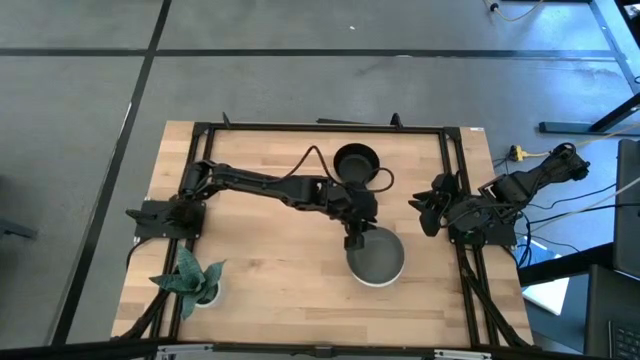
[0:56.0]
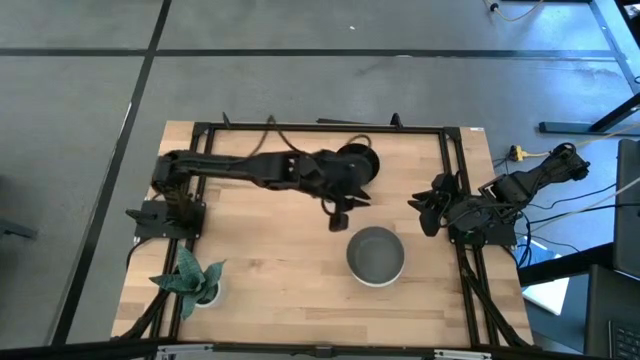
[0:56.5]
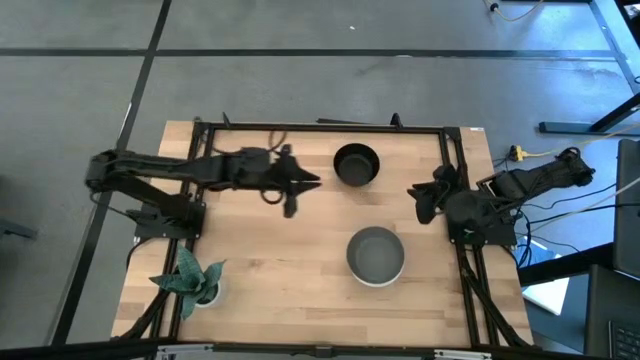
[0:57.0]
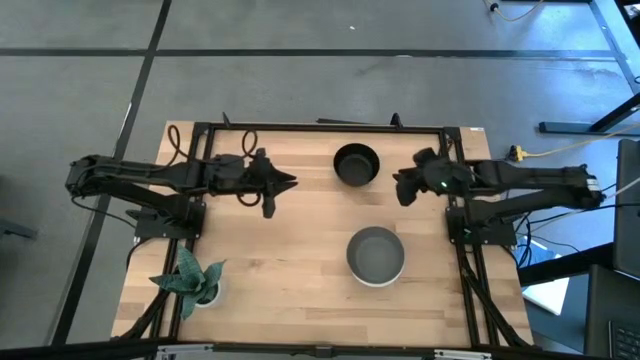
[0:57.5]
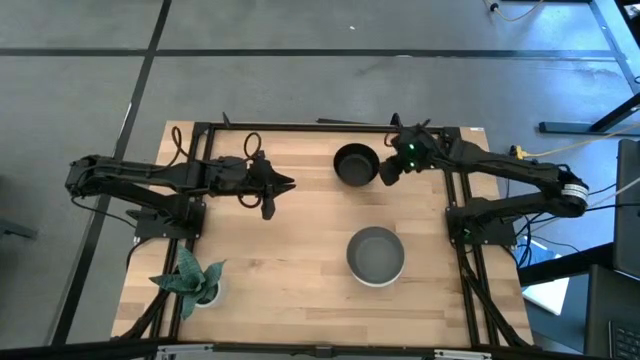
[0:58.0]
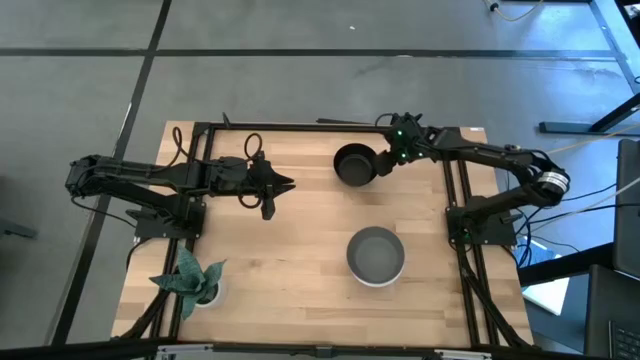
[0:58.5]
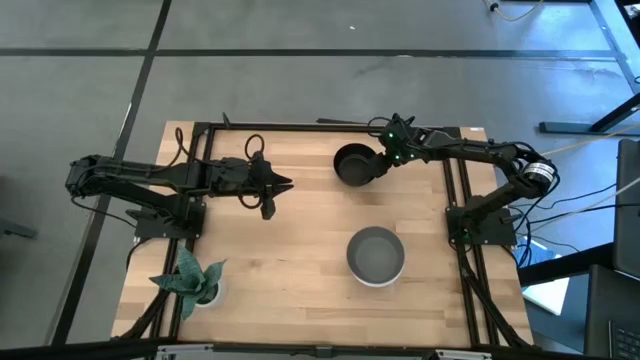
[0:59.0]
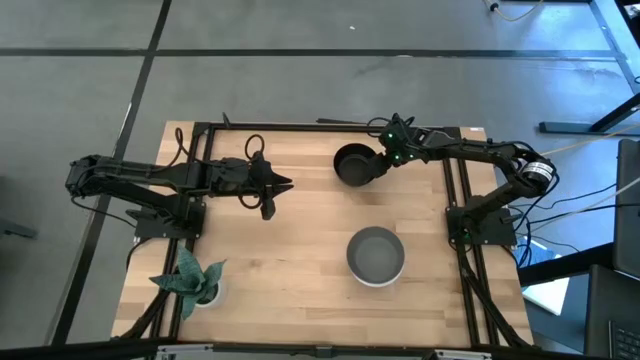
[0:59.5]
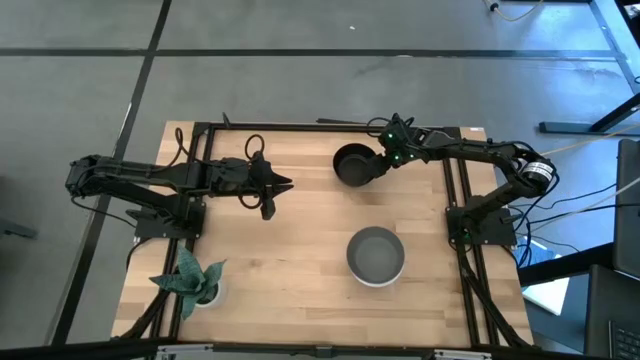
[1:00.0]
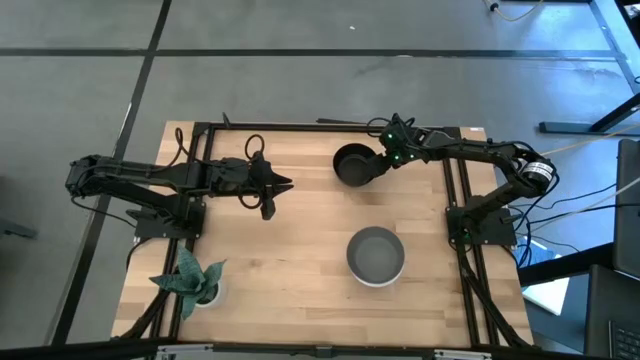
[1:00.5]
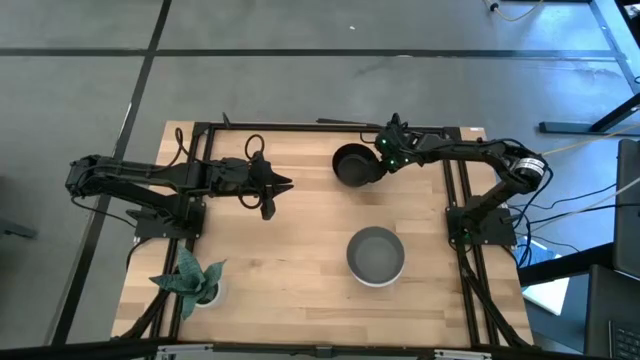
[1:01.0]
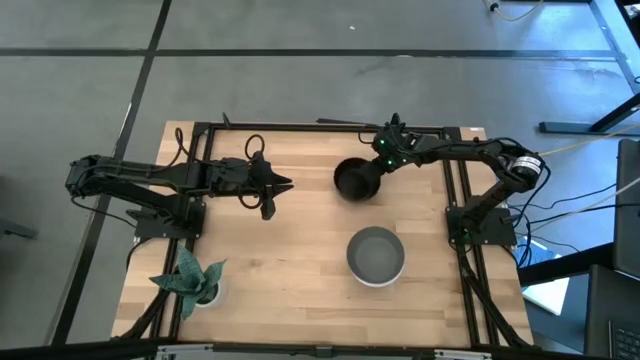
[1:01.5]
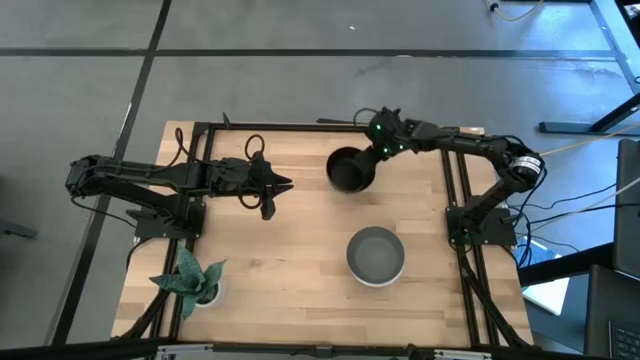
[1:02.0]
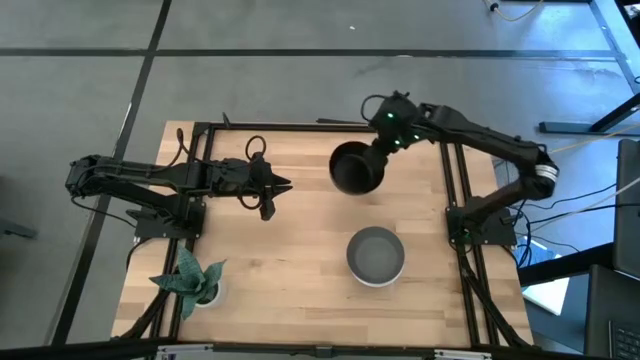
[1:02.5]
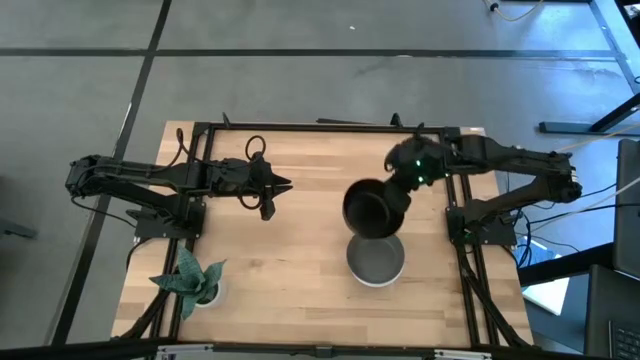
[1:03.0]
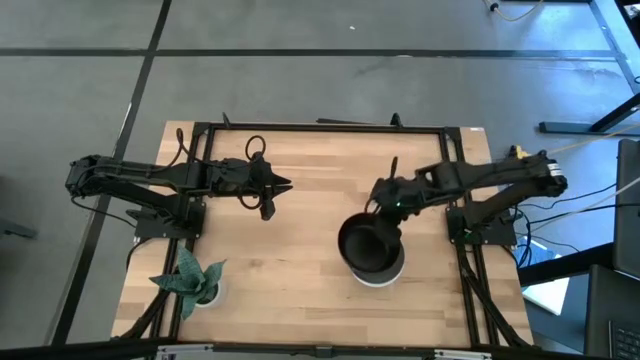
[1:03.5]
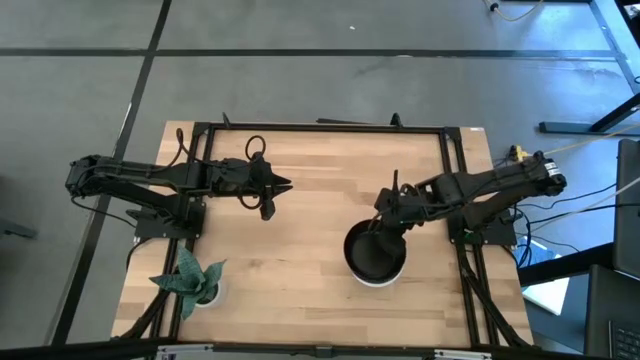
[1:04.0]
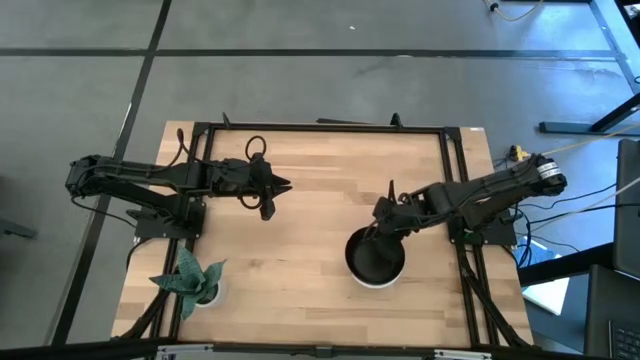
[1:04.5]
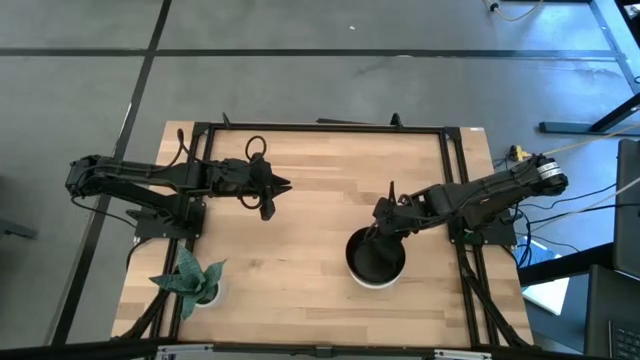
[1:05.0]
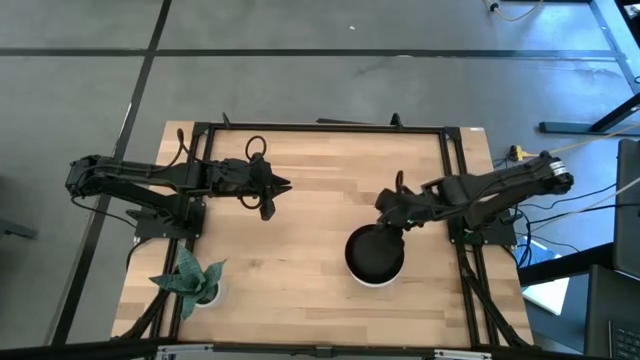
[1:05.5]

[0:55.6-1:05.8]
Task: Nest bowls inside each other
Stack the black bowl on the gray bowl

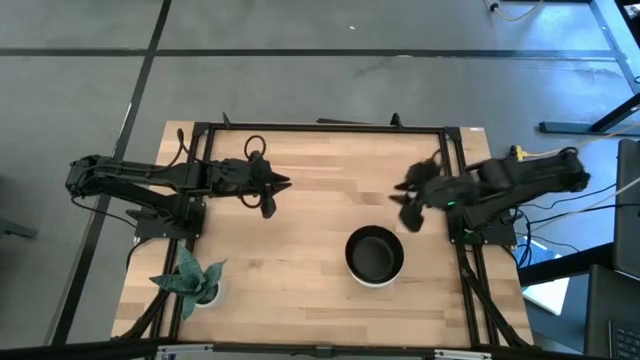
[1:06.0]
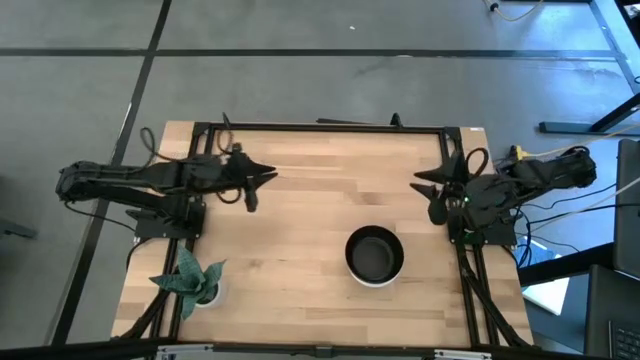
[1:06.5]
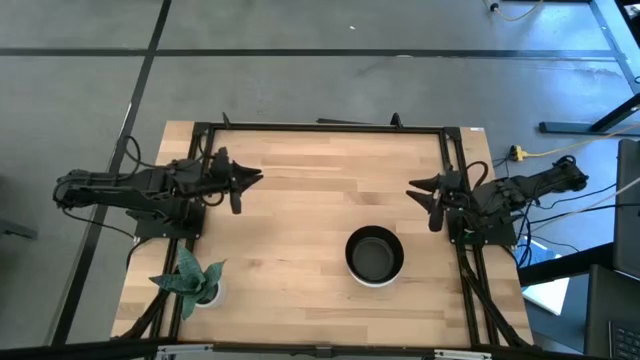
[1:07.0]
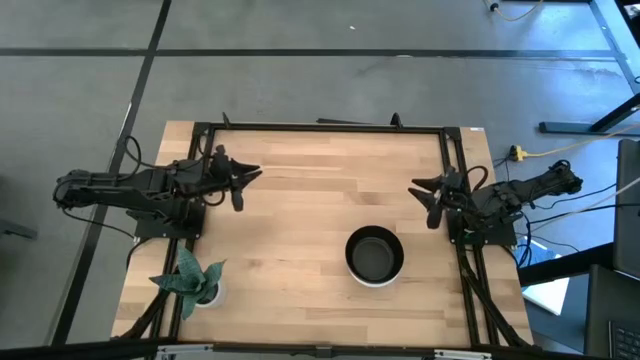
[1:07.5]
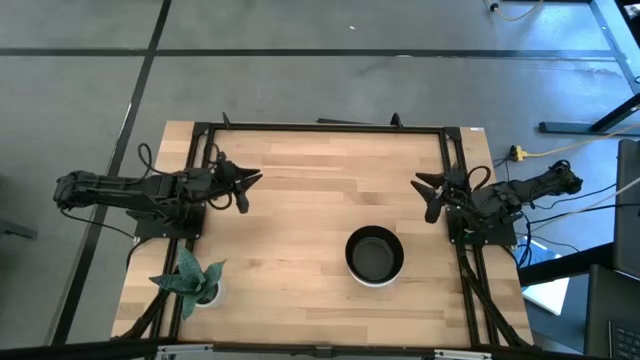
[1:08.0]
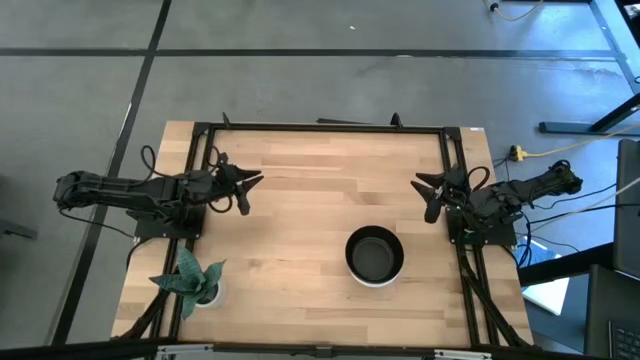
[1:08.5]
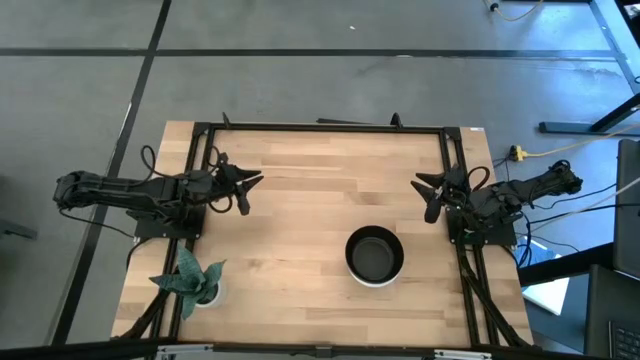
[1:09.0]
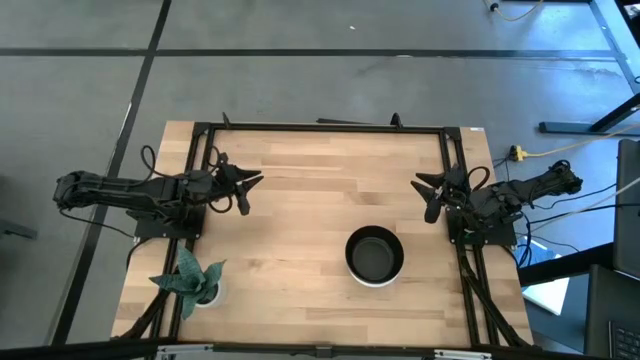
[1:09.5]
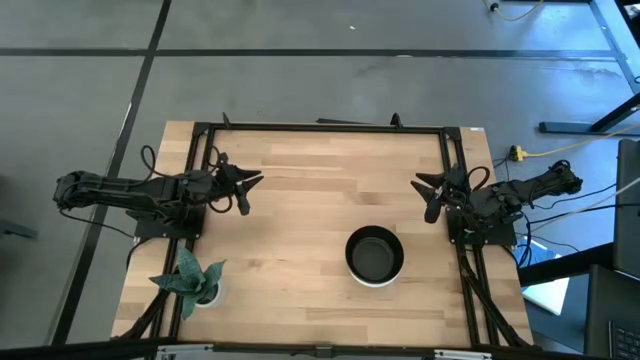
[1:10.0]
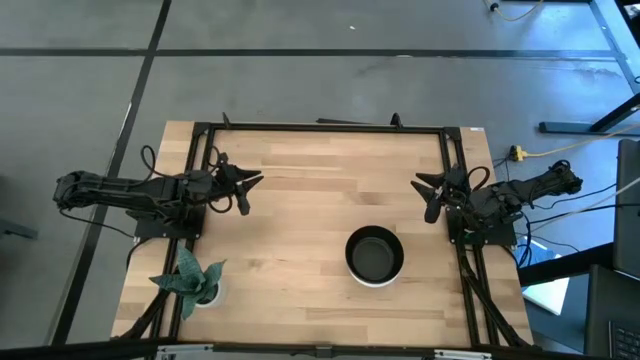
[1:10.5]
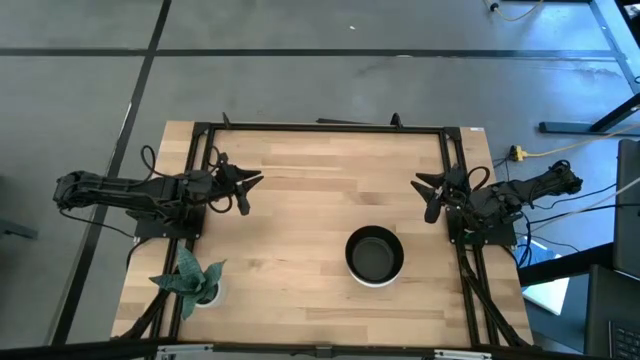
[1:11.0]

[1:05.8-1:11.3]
Return to Home Position

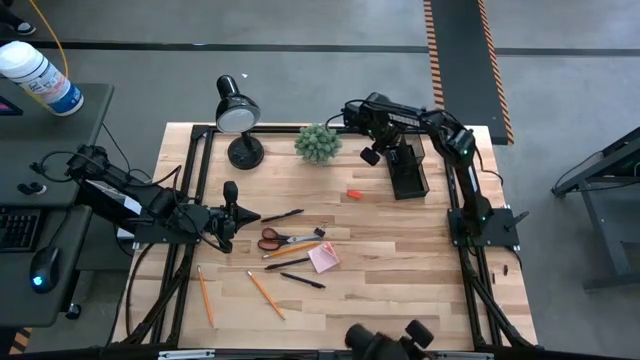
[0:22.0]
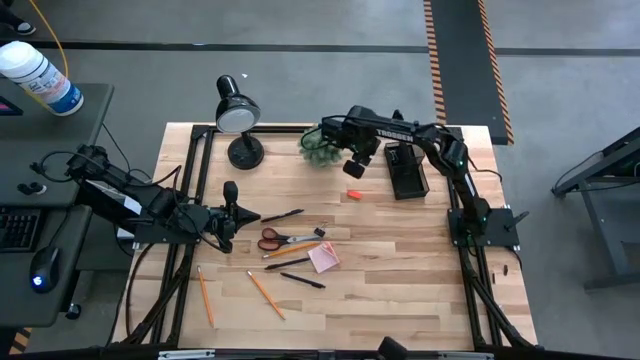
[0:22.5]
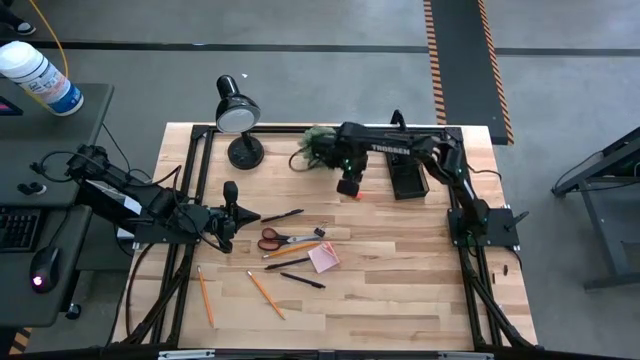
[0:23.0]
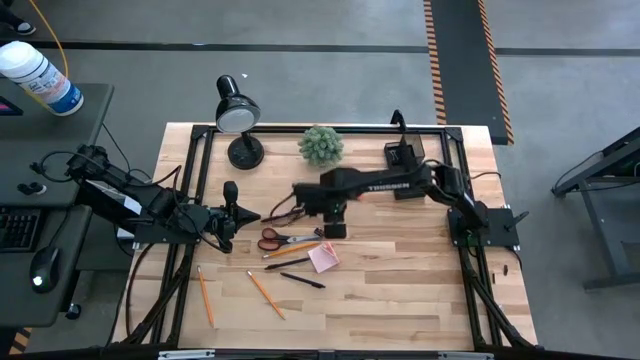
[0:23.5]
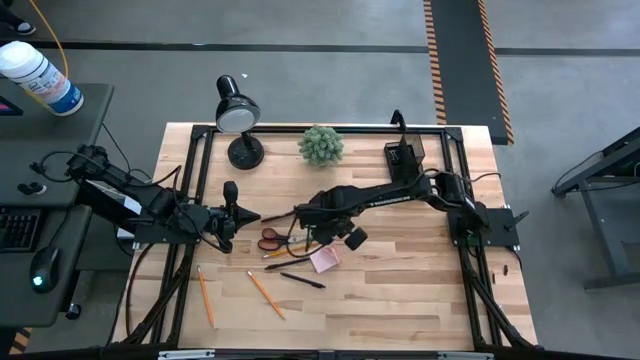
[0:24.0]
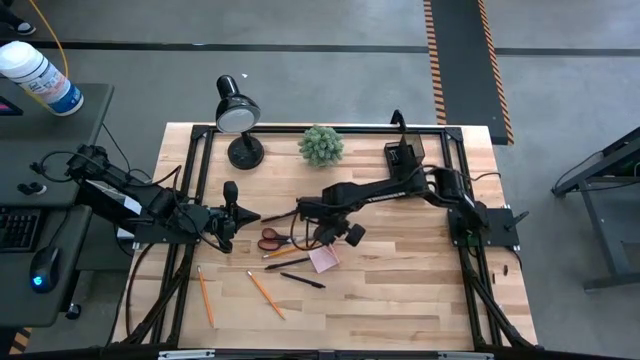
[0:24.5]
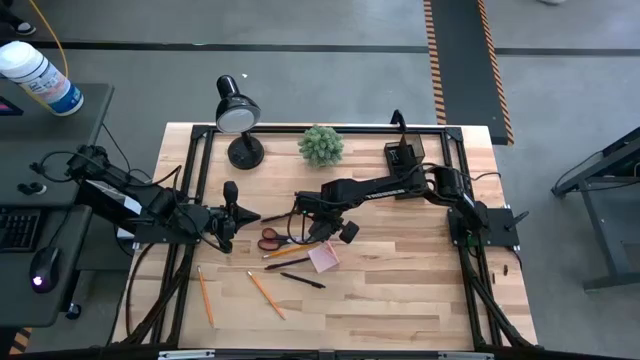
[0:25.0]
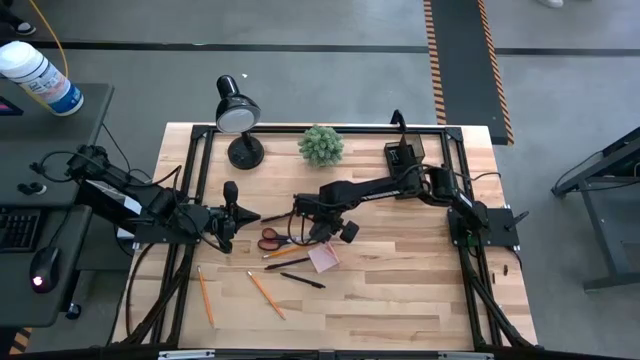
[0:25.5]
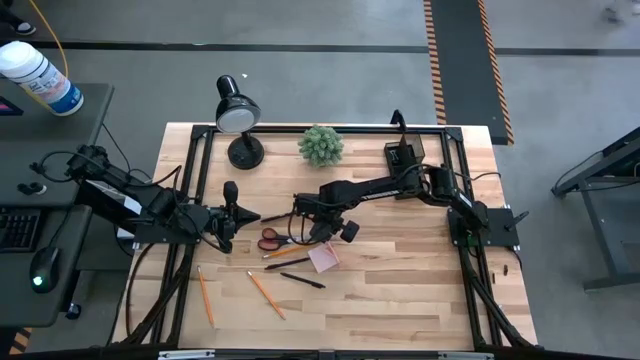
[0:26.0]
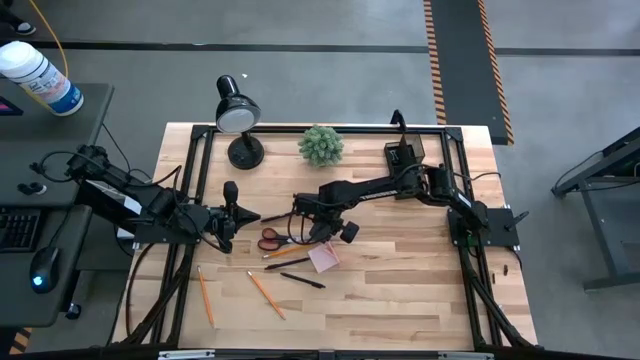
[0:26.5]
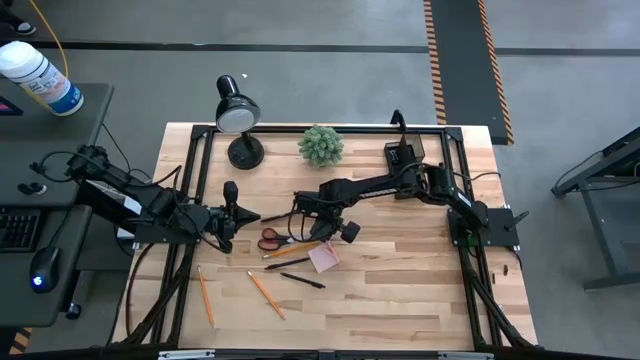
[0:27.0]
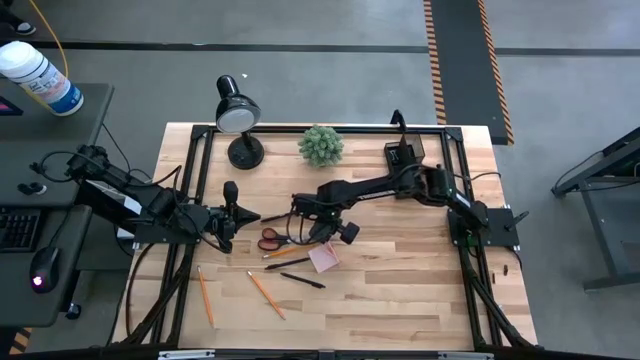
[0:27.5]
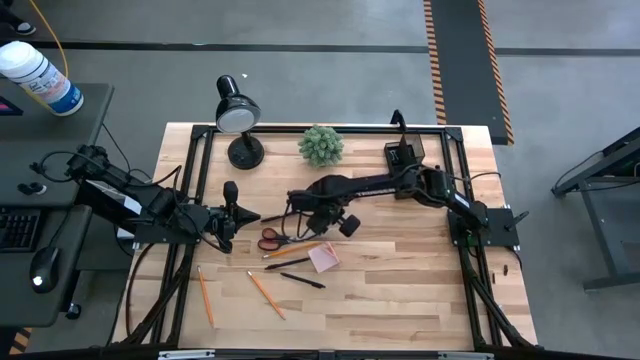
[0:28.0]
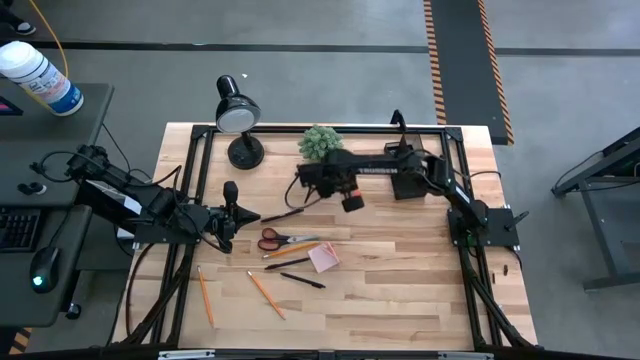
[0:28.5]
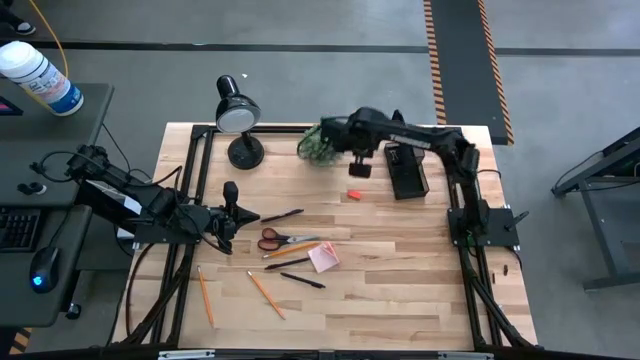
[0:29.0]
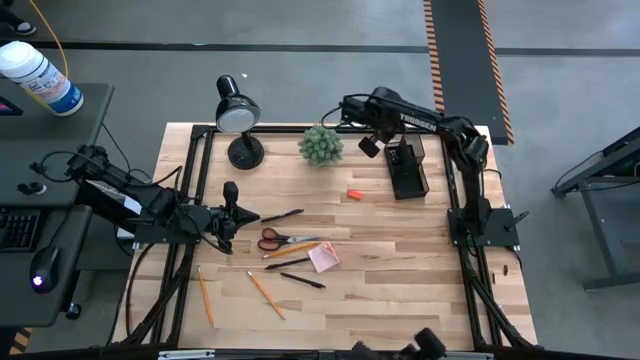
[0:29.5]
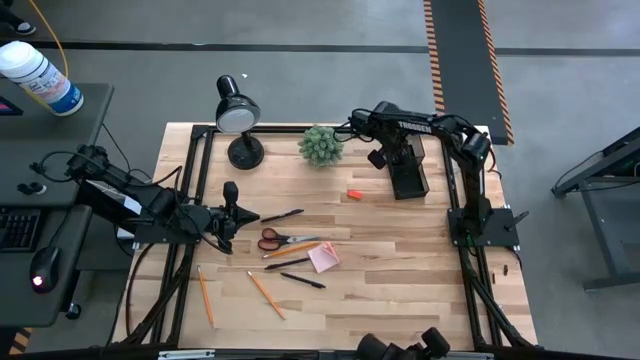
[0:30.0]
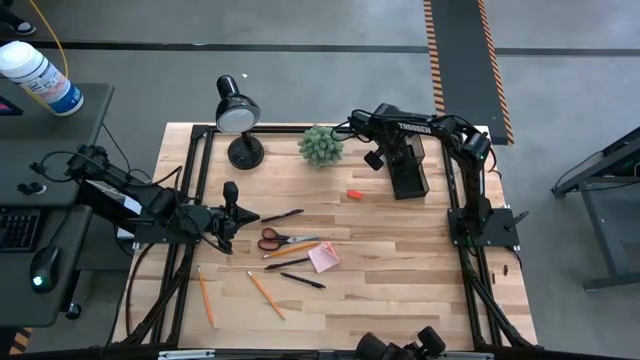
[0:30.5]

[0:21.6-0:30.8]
Task: Pick and place office supplies into organizer
Put the binder clip into the desk organizer
